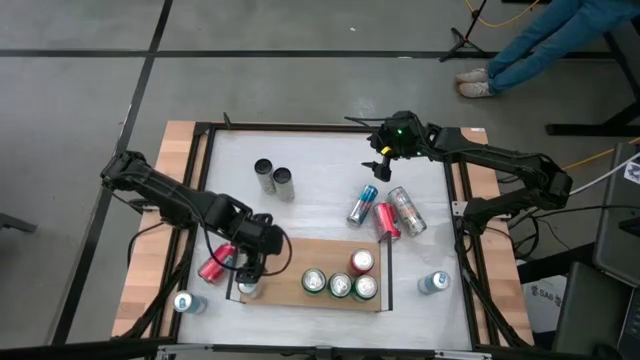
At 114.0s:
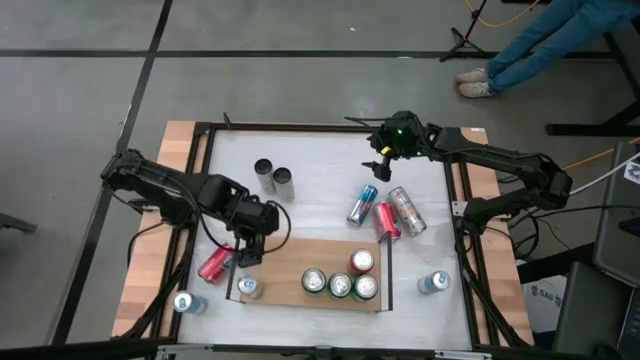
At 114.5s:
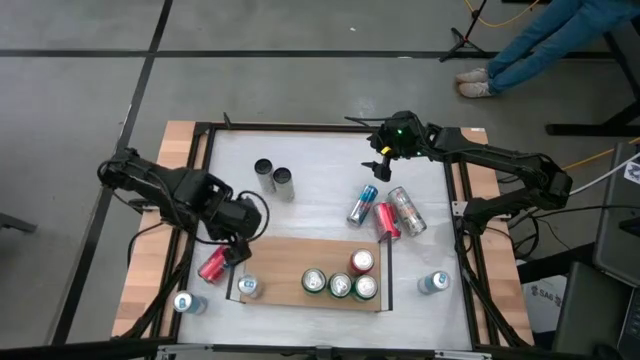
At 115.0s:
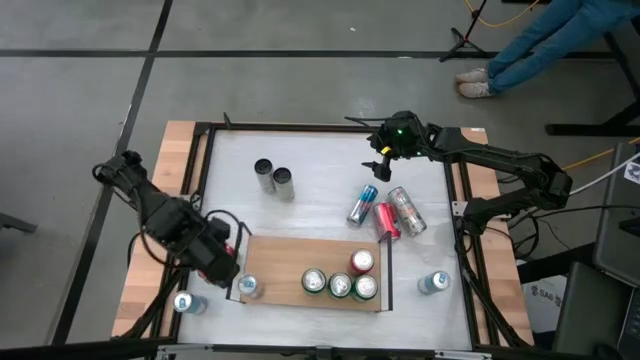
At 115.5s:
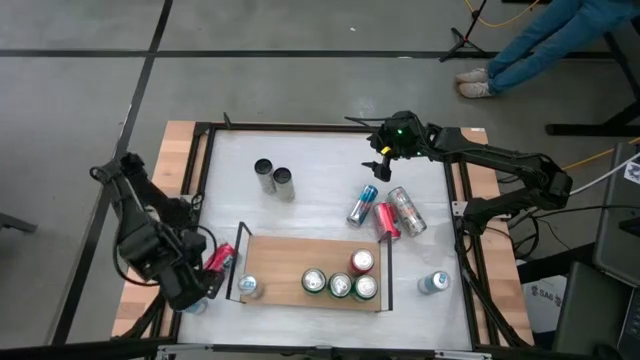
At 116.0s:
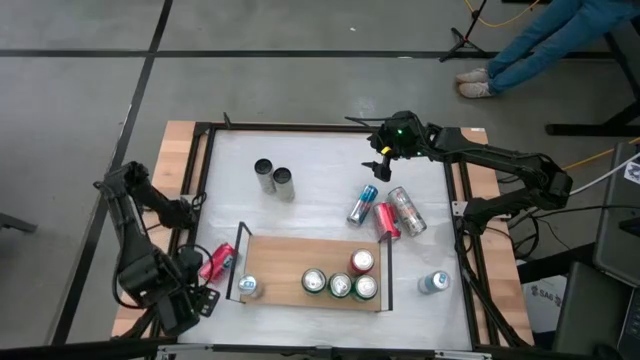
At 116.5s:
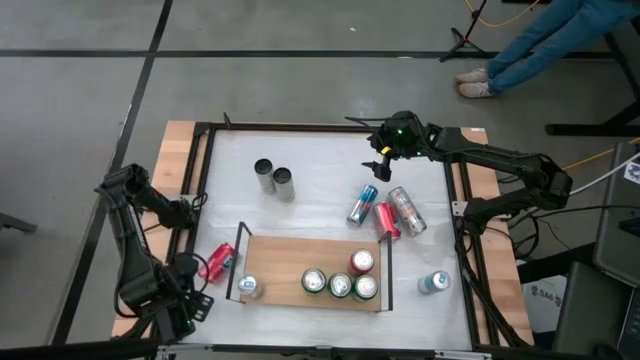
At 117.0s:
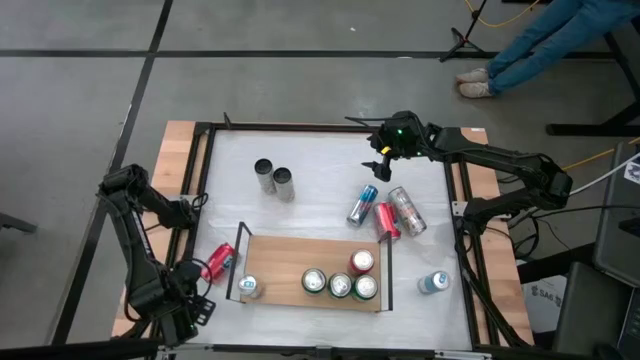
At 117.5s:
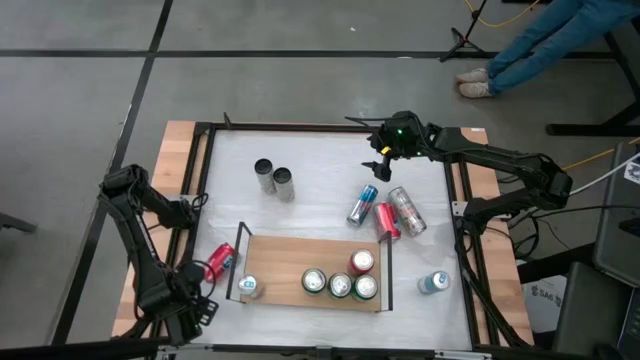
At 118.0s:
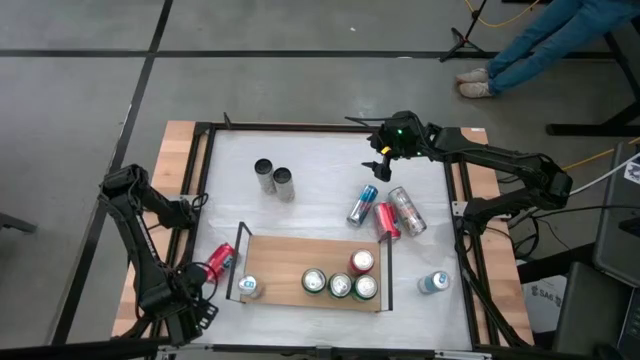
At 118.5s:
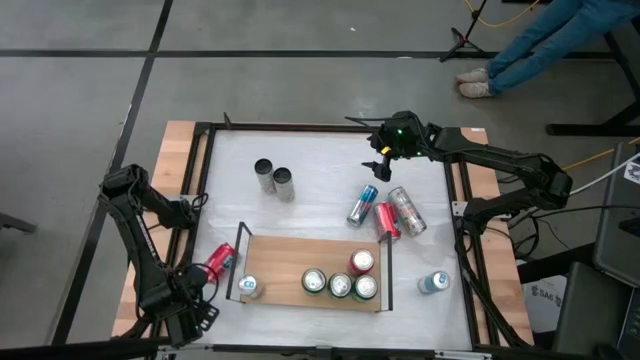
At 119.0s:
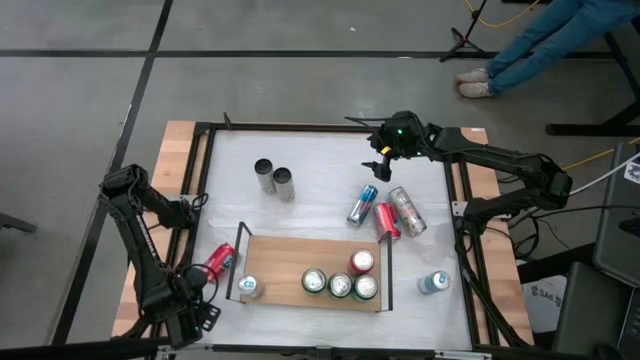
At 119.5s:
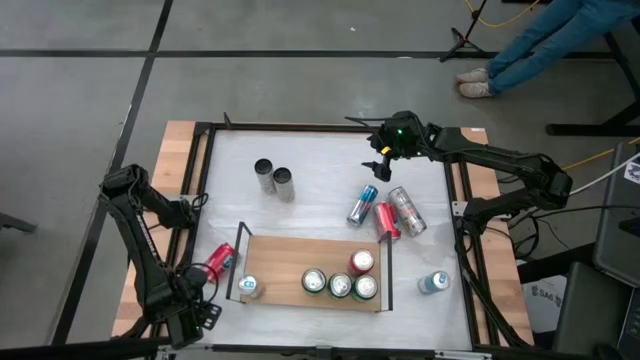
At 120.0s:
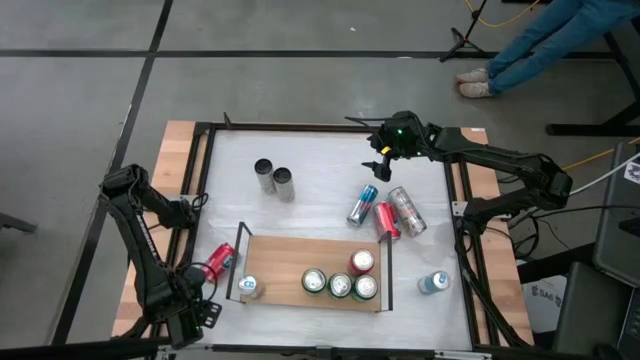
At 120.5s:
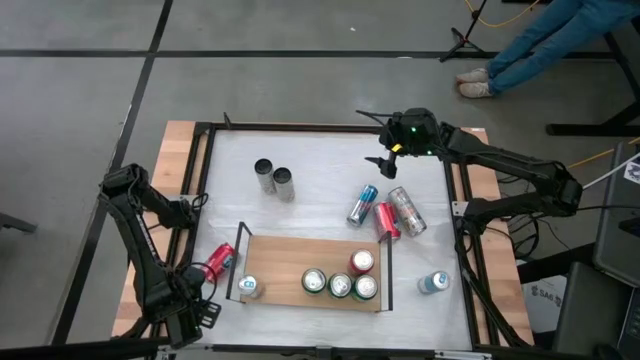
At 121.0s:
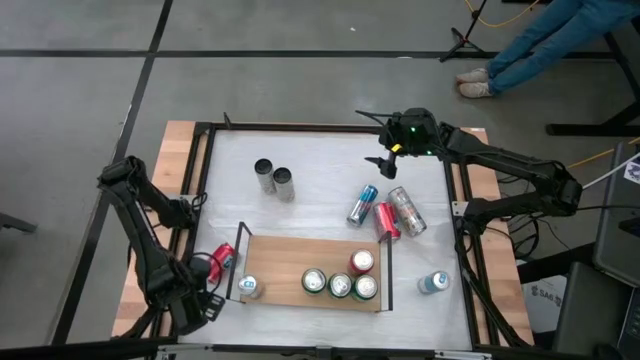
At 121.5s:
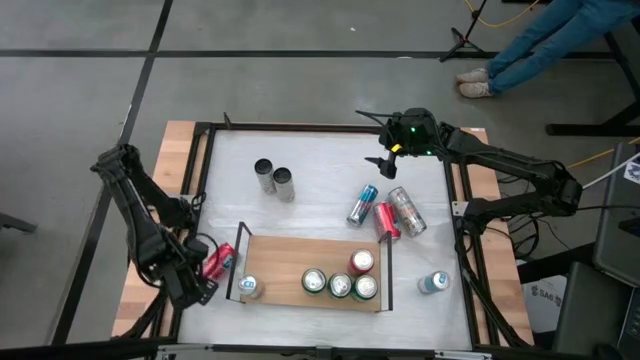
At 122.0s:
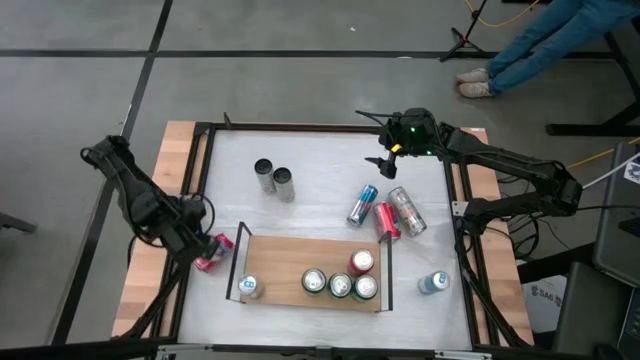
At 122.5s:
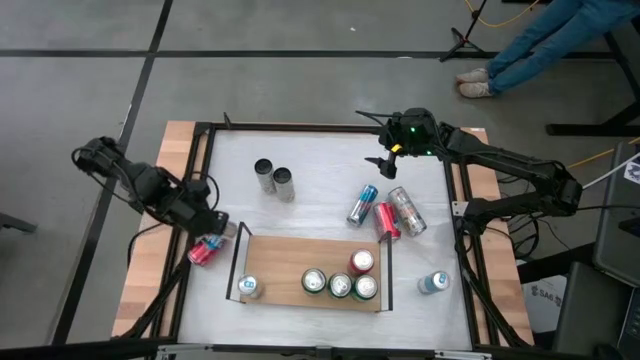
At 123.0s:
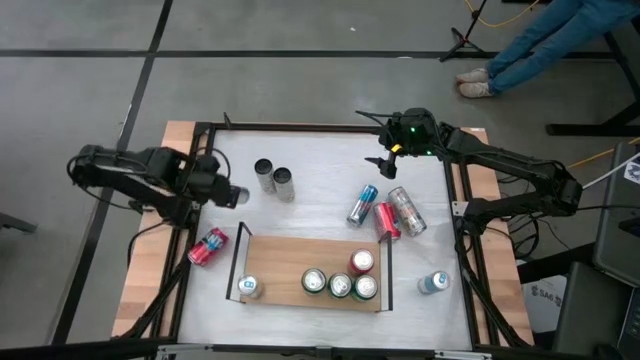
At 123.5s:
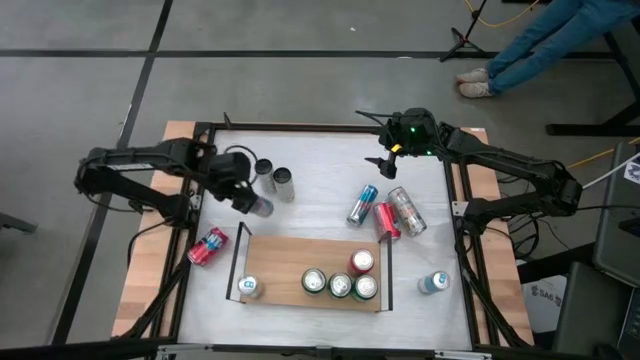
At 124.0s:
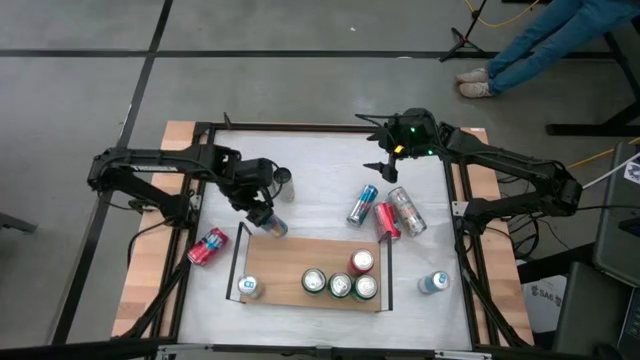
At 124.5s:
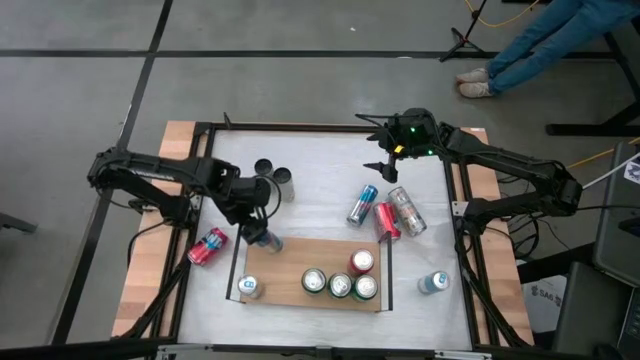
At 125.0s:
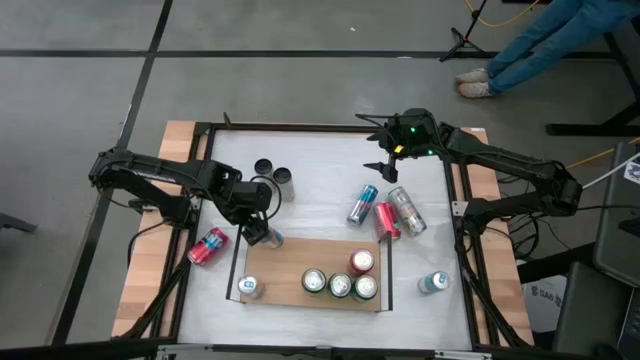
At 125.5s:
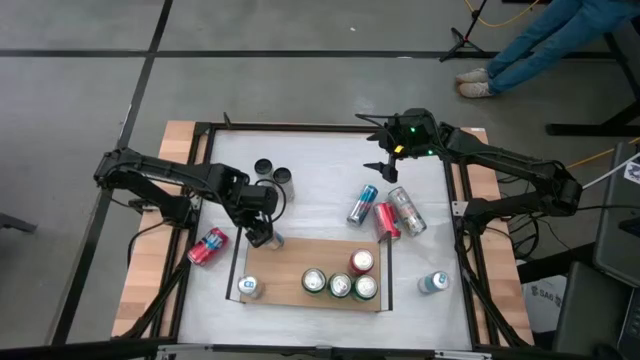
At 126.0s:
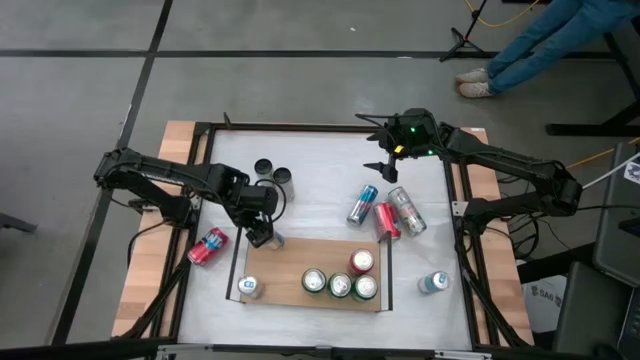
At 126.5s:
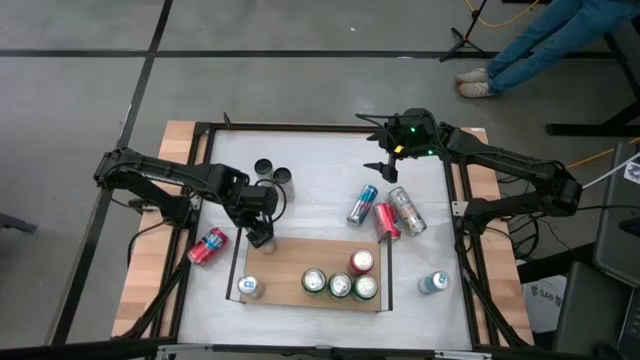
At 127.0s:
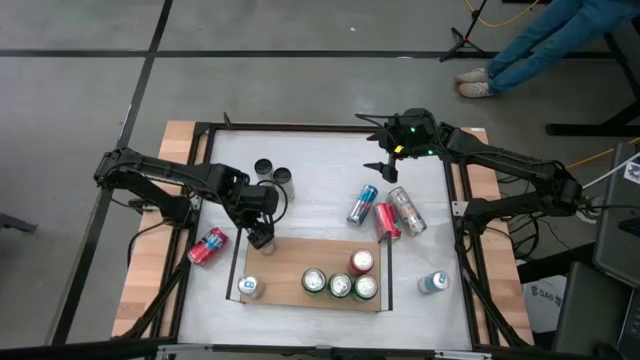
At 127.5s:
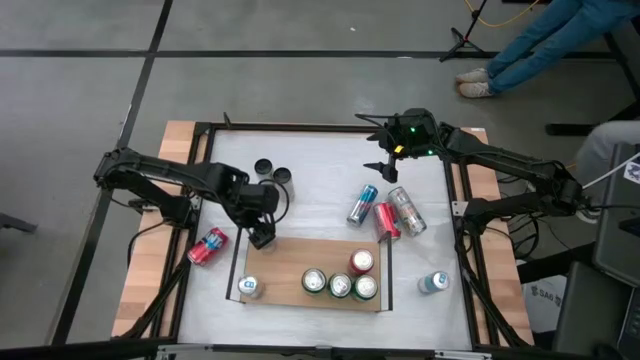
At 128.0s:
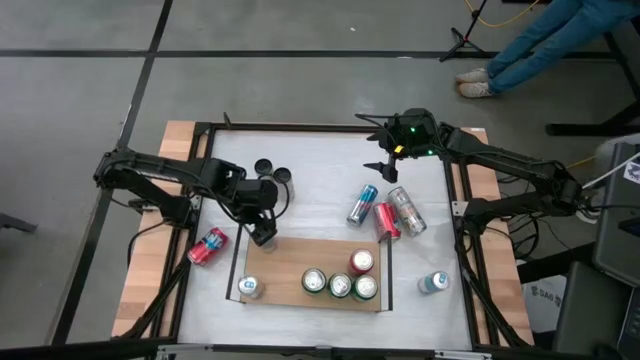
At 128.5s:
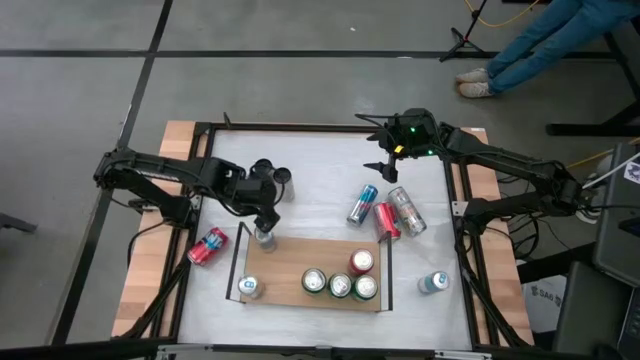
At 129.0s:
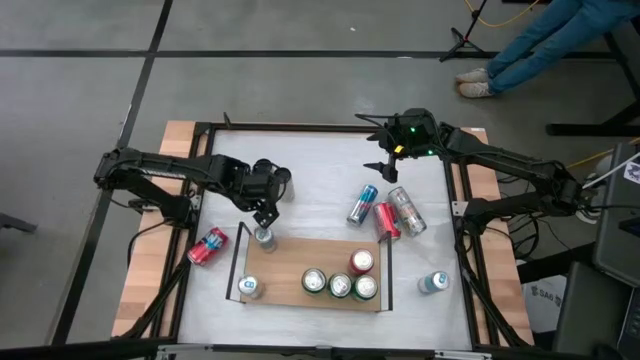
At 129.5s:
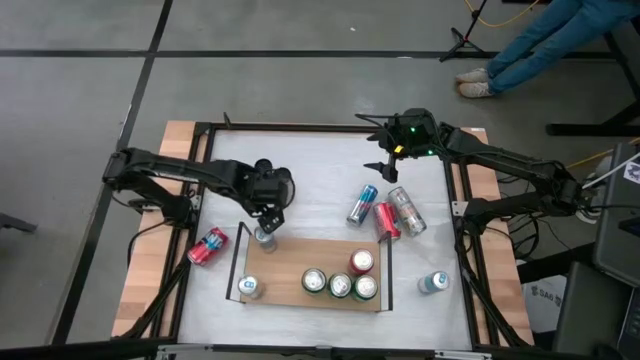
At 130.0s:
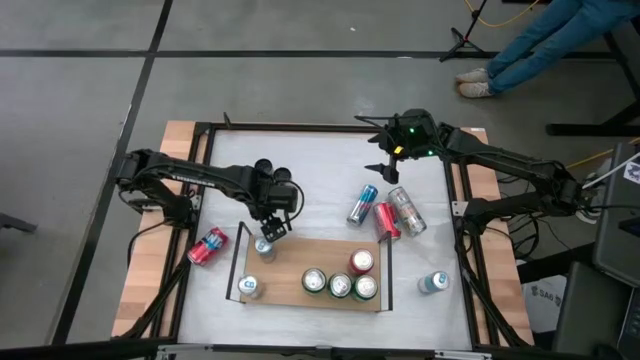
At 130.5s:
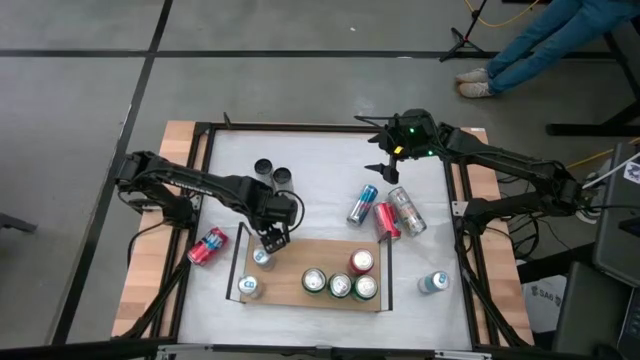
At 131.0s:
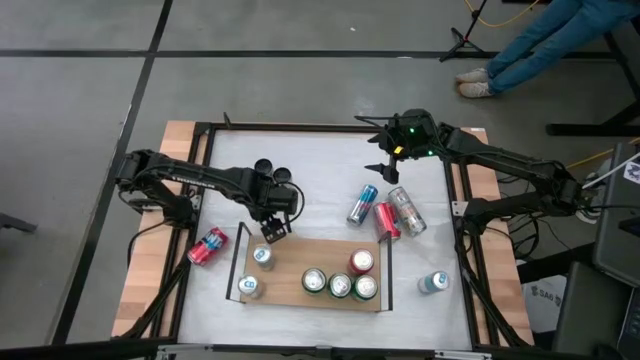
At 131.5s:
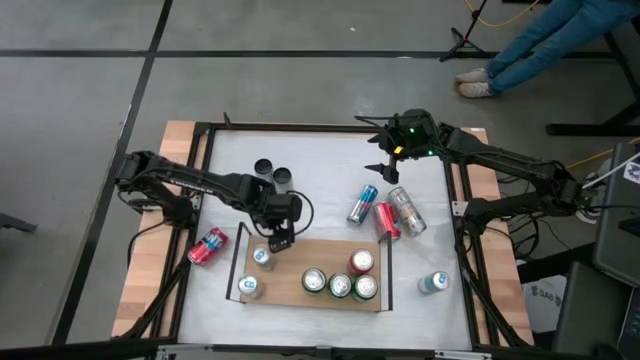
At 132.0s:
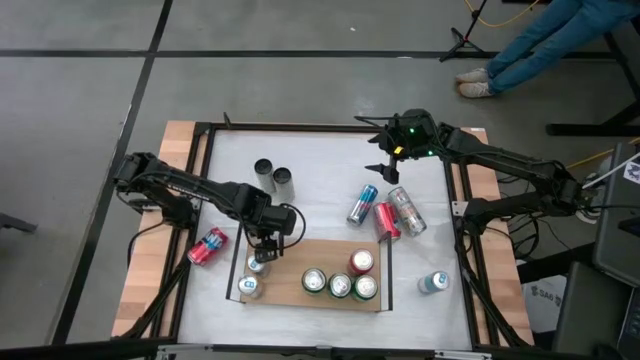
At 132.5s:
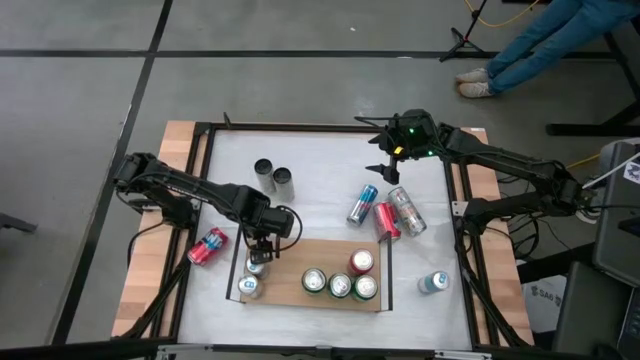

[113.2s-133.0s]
Task: Place canned beverage on shelf
Put the blue soda can on the shelf aligned with the other blue soda can

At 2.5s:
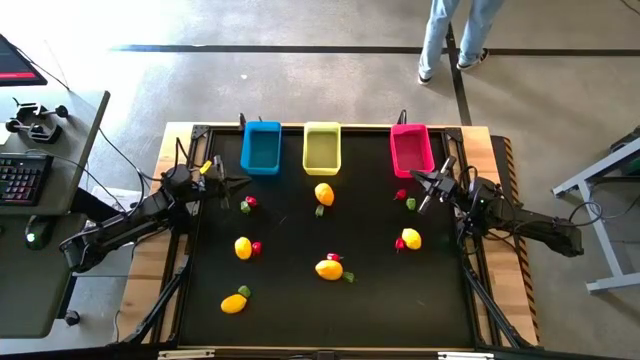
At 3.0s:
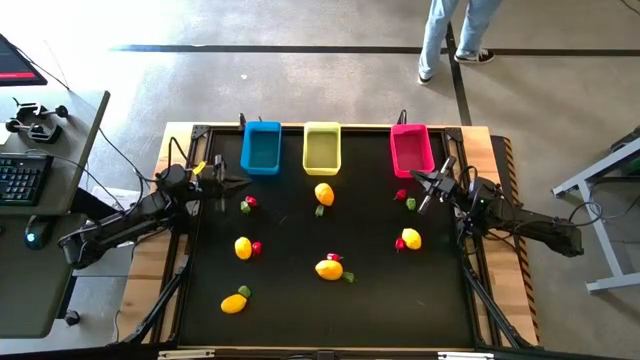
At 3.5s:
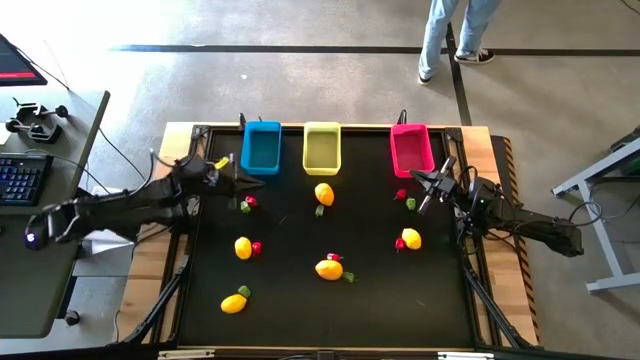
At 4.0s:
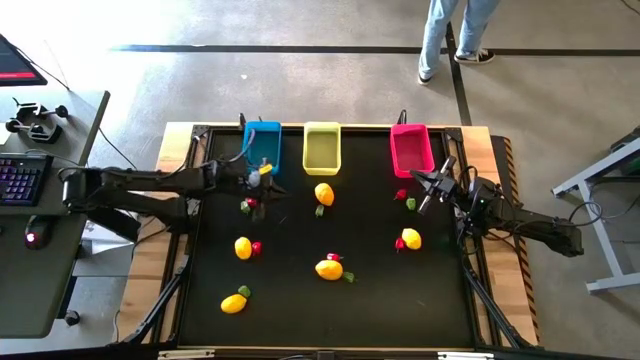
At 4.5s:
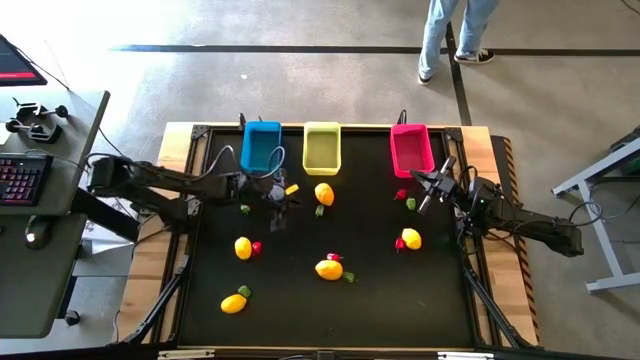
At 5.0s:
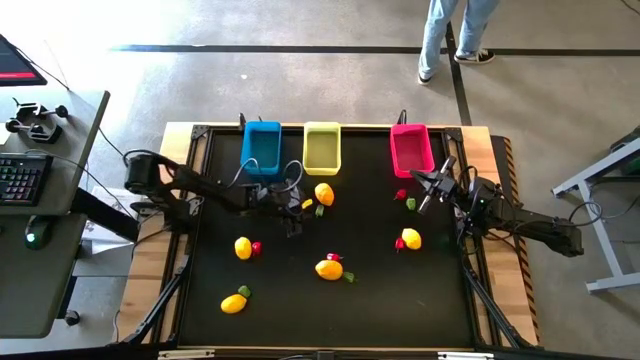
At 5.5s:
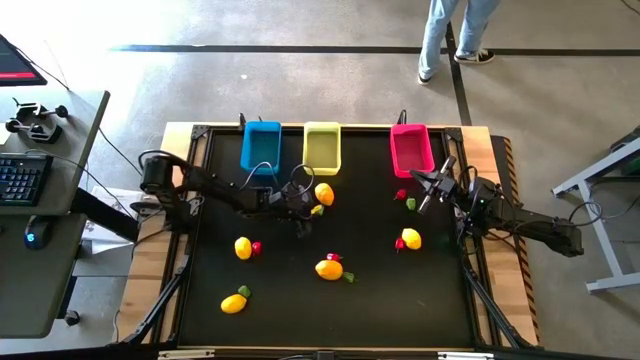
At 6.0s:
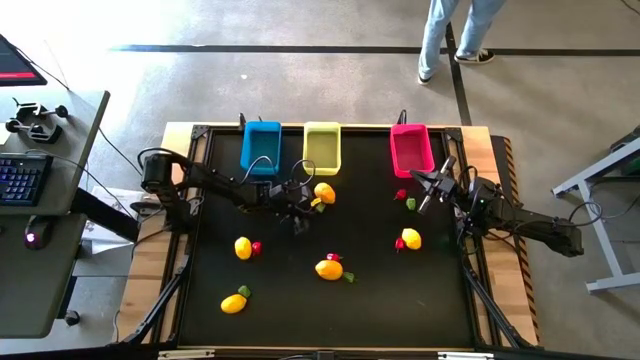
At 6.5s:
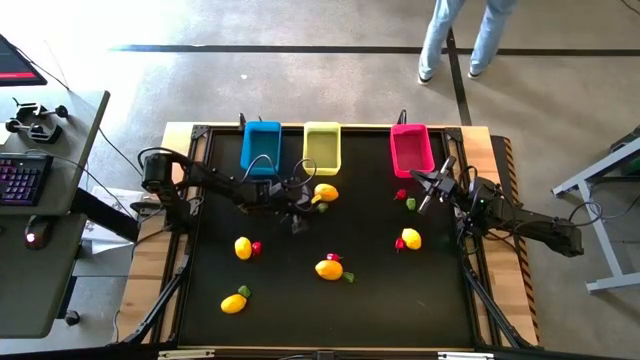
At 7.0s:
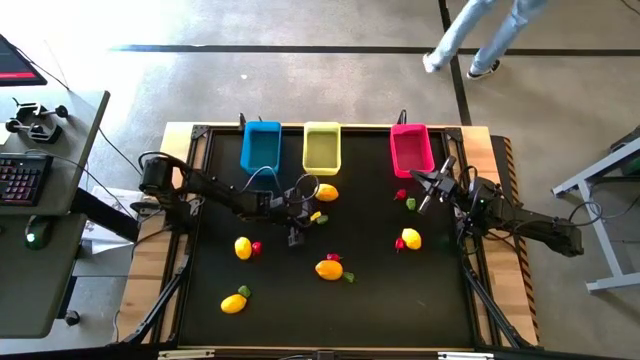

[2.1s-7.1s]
Task: Sort produce into baskets
Put the green bell pepper into the pink bin
